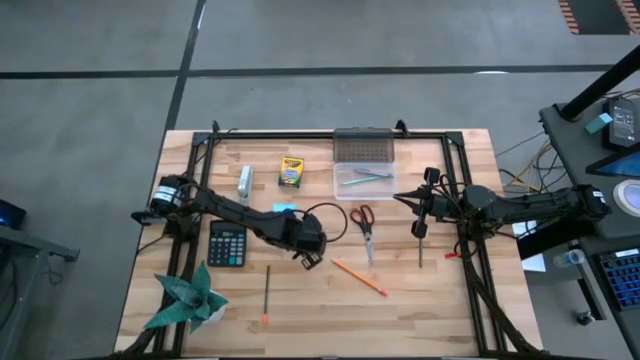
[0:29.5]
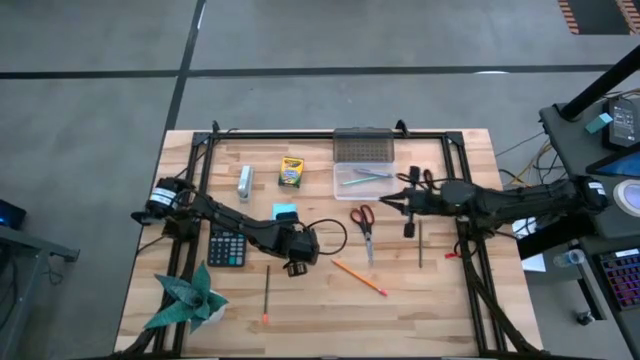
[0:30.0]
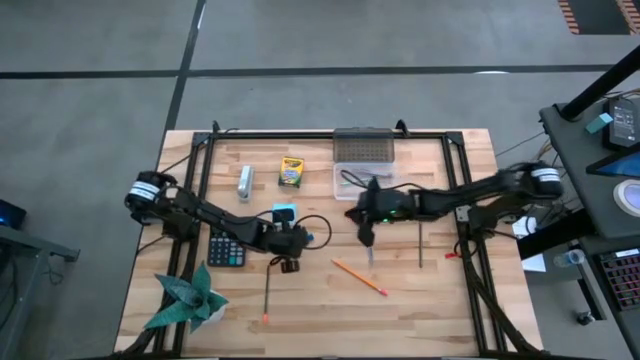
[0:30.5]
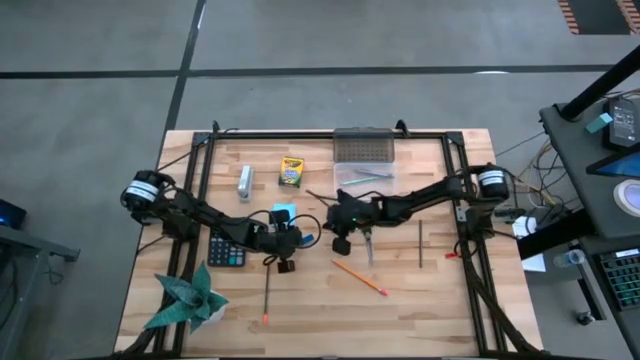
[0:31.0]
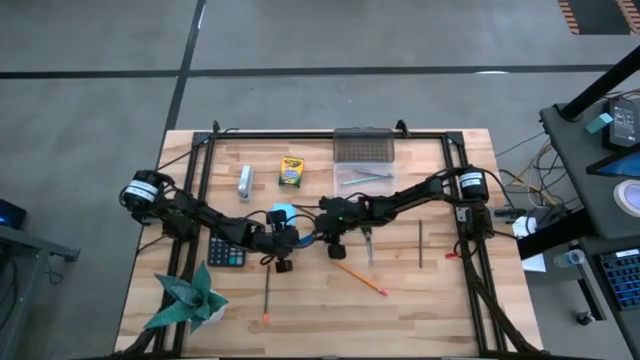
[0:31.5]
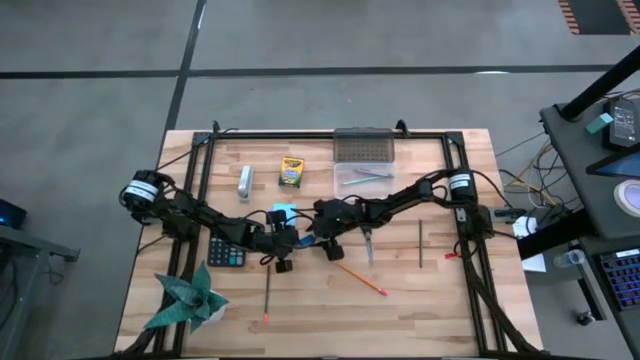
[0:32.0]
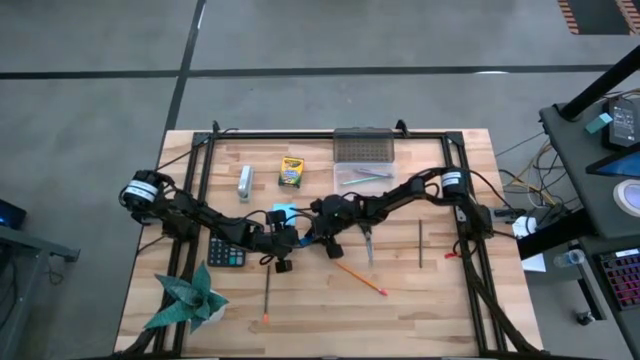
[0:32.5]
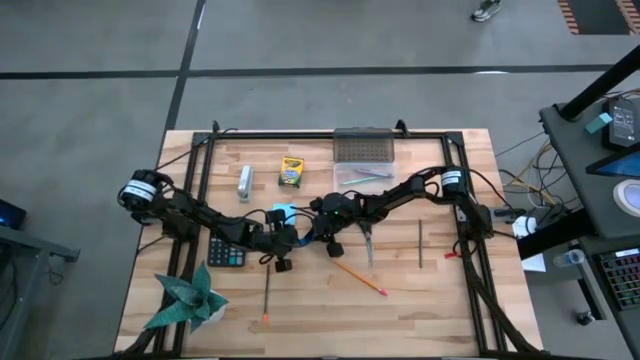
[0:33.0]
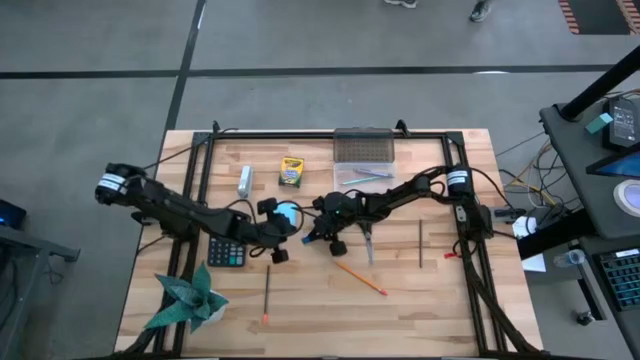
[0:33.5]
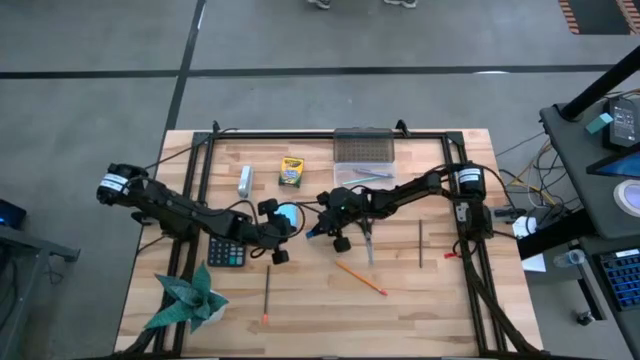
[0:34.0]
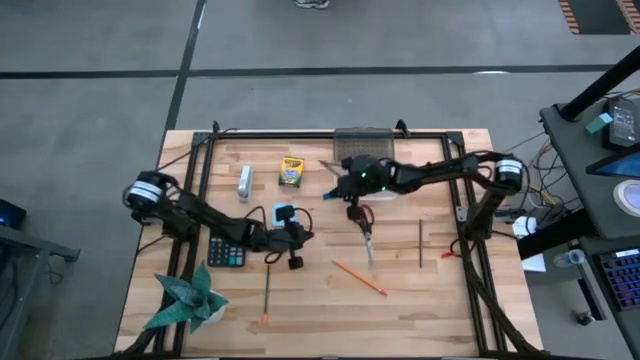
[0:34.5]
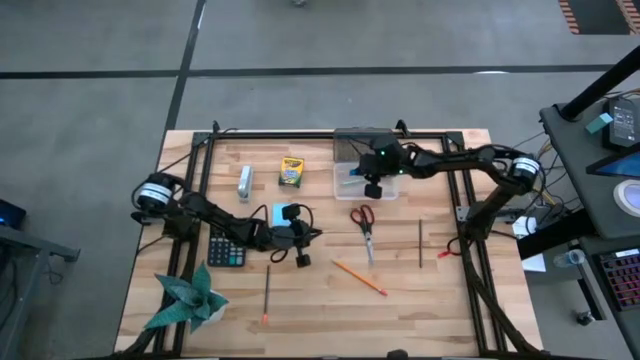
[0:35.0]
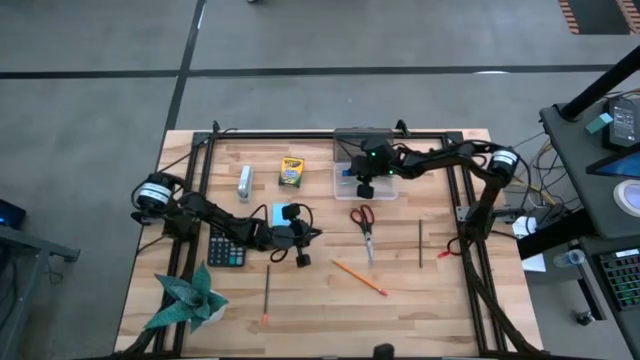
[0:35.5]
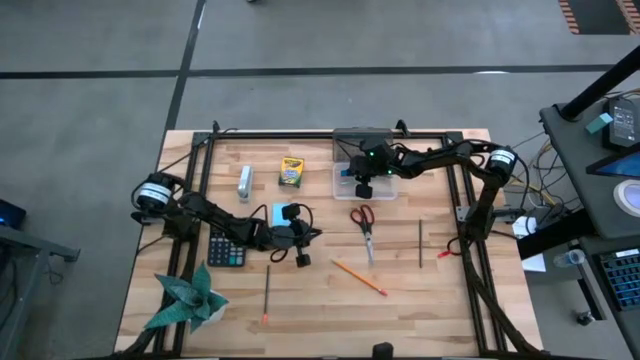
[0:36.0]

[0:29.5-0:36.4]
Task: Pack school essentials
Put the blue eraser into the transparent supply box

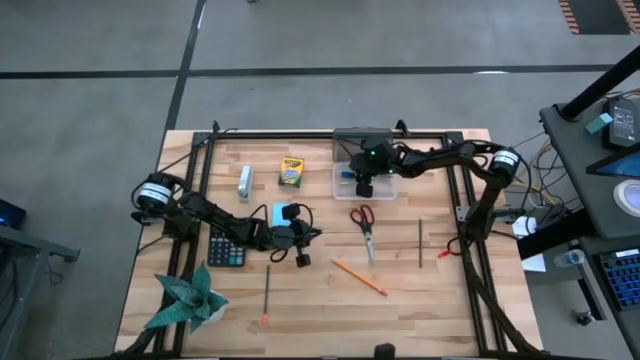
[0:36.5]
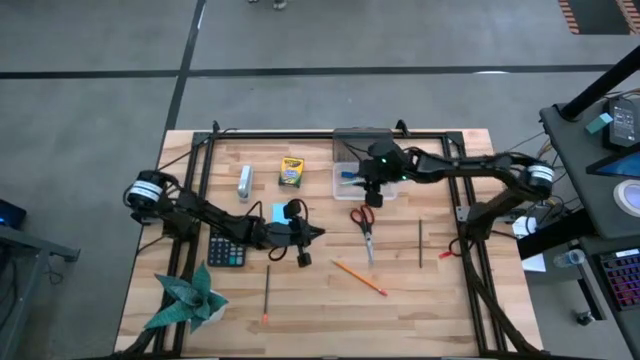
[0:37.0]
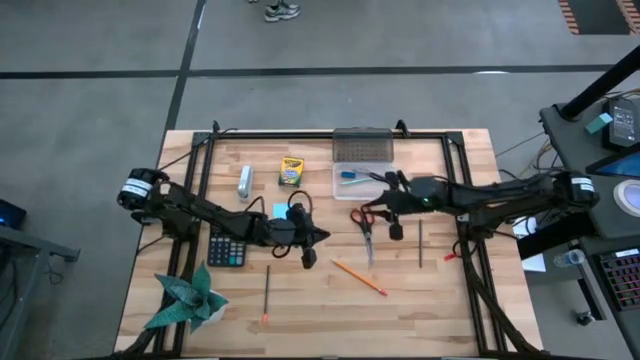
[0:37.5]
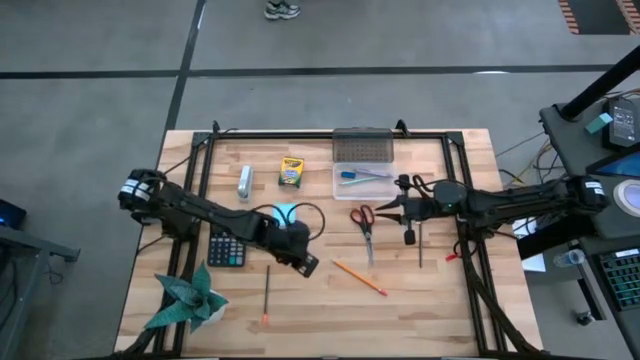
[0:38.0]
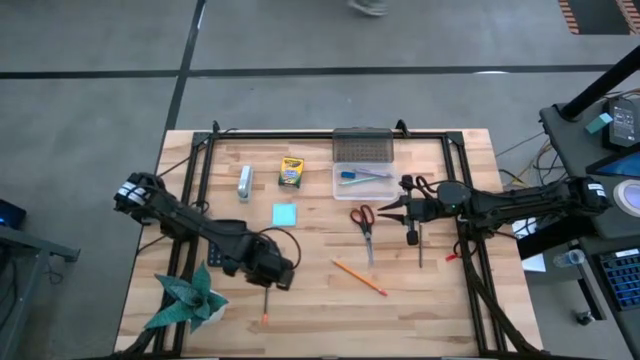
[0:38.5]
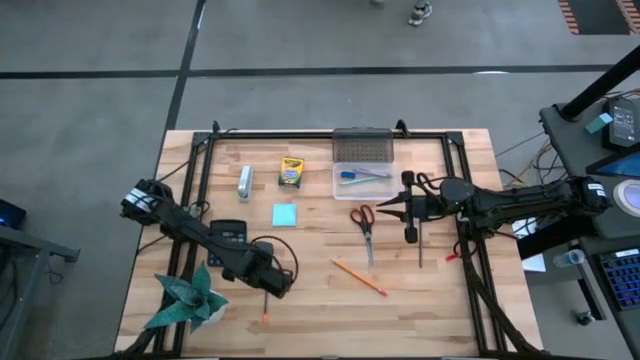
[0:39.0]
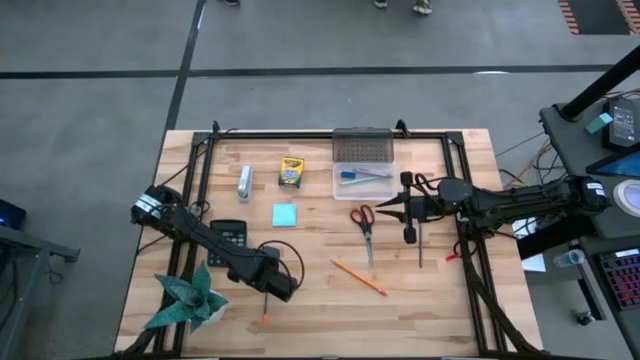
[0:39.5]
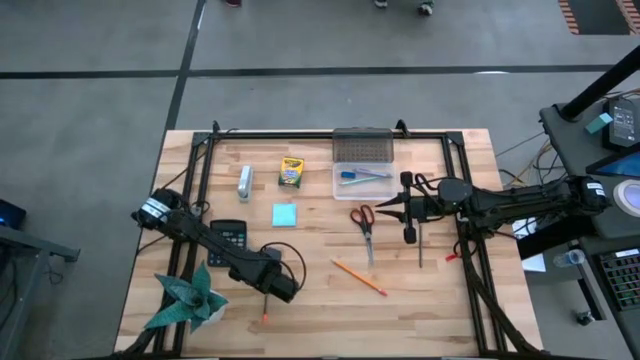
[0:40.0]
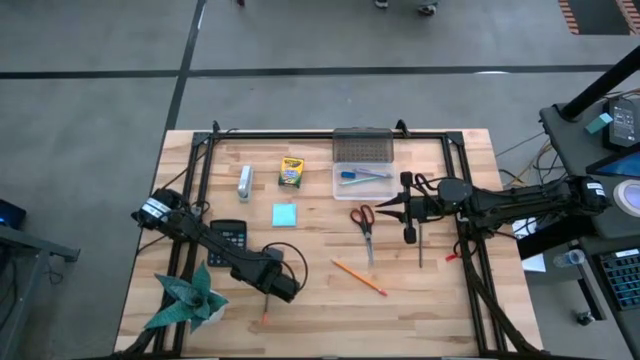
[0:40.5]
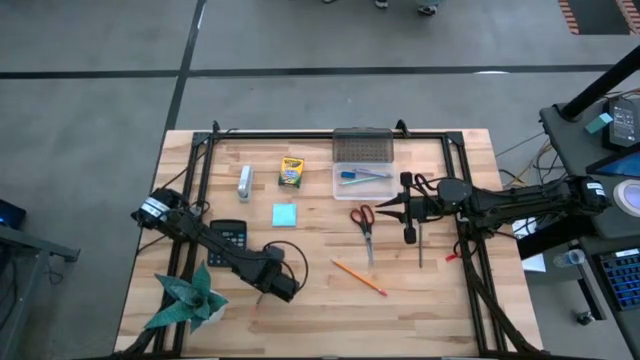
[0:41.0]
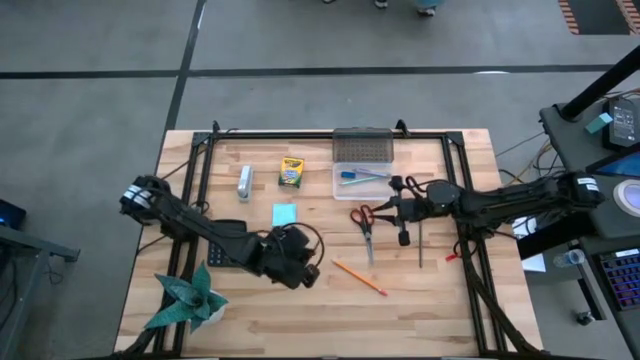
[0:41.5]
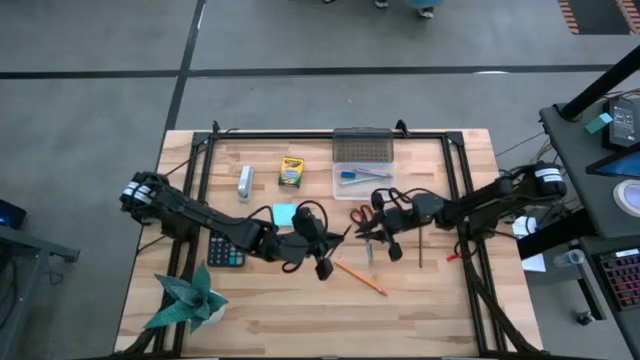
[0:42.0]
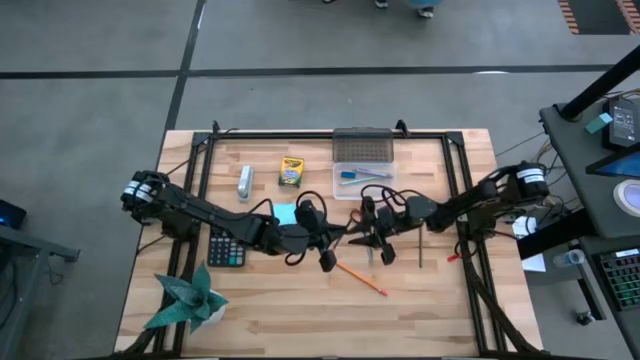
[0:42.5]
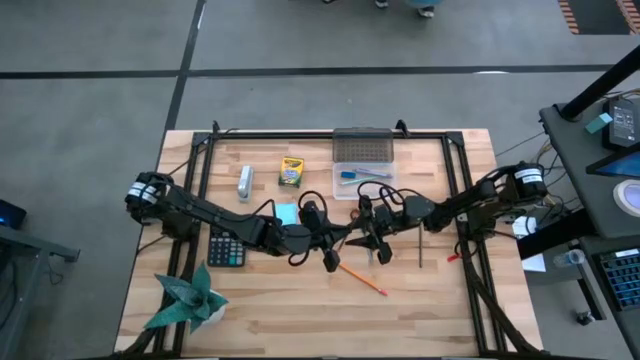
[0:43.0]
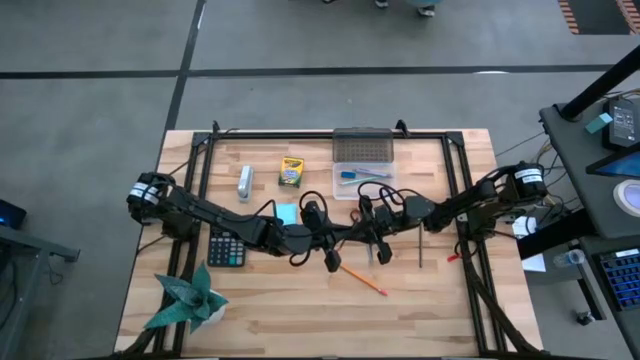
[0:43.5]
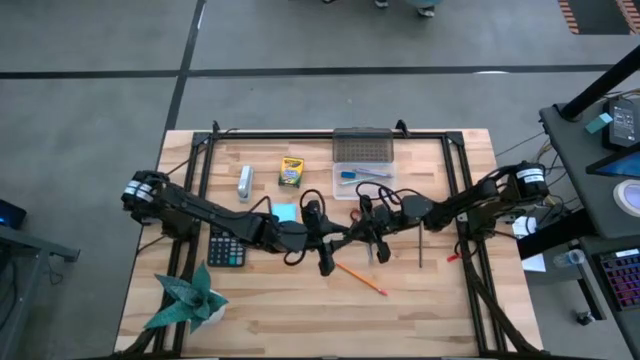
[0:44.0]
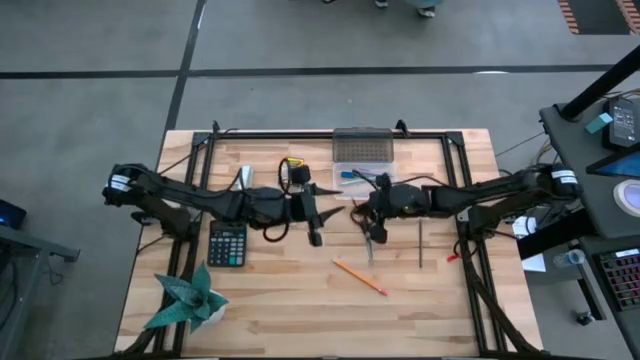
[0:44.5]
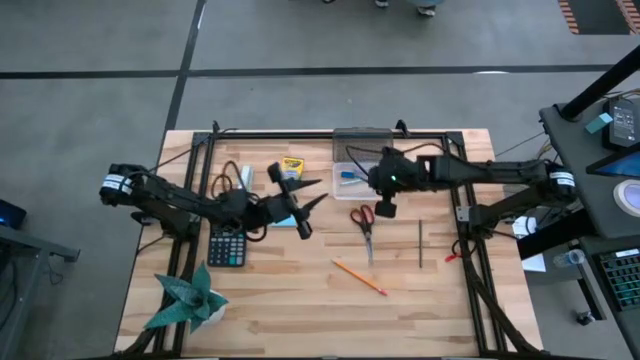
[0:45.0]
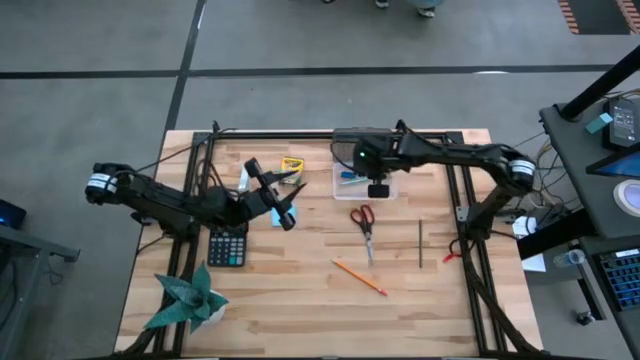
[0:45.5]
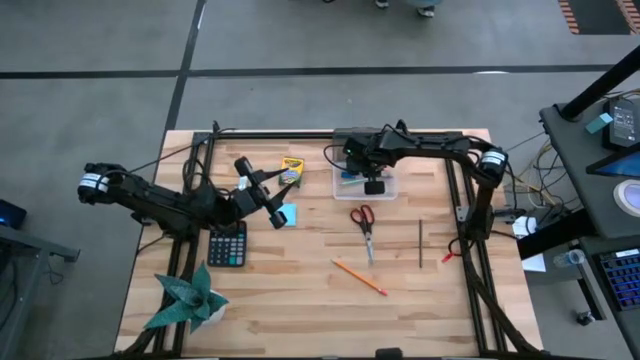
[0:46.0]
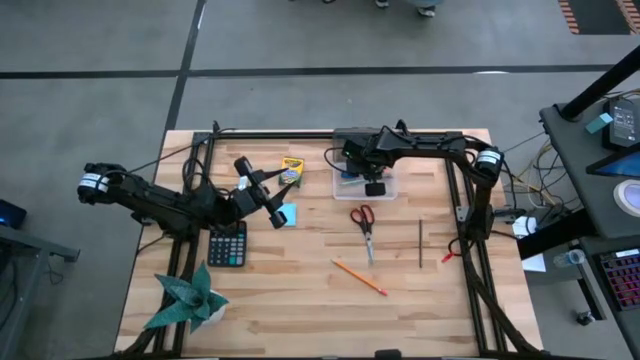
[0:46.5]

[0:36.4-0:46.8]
Put the left black pencil into the transparent supply box

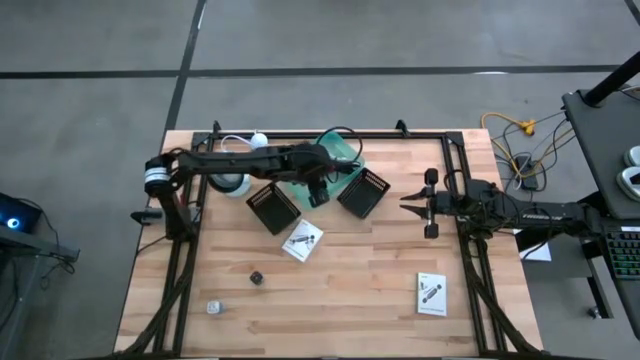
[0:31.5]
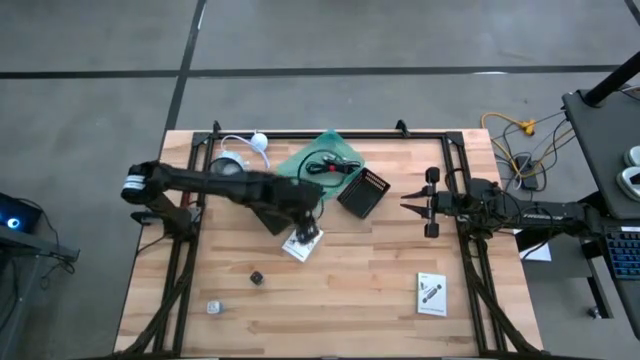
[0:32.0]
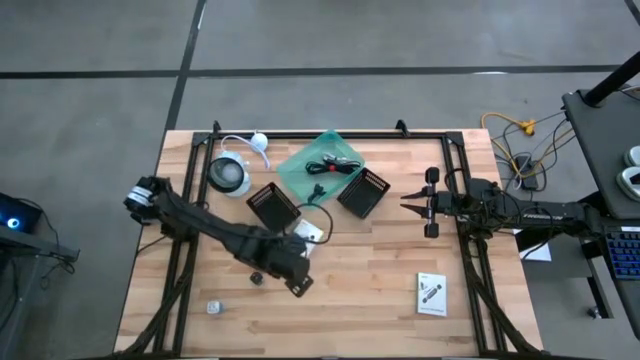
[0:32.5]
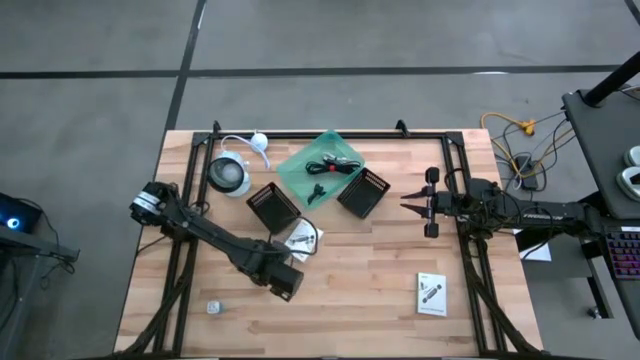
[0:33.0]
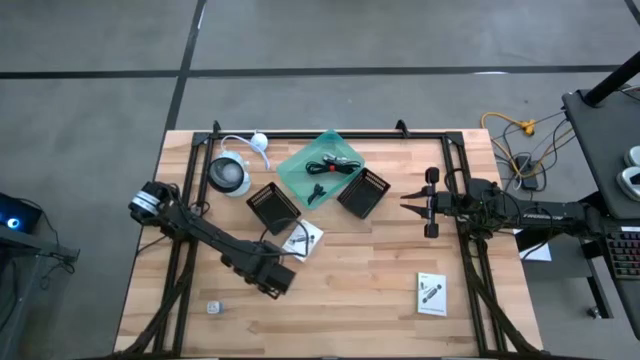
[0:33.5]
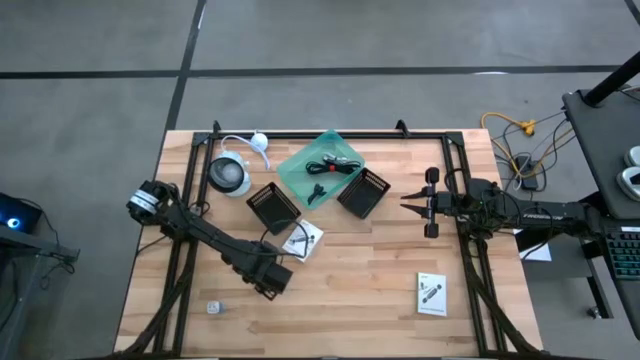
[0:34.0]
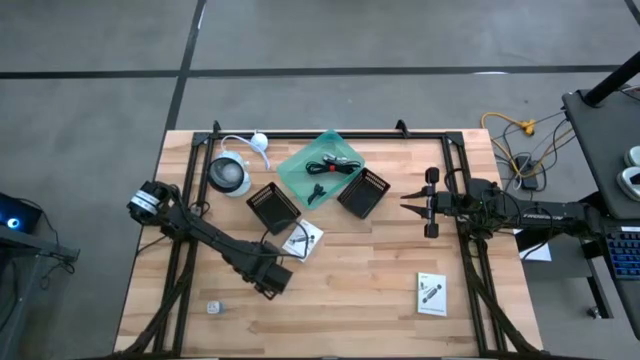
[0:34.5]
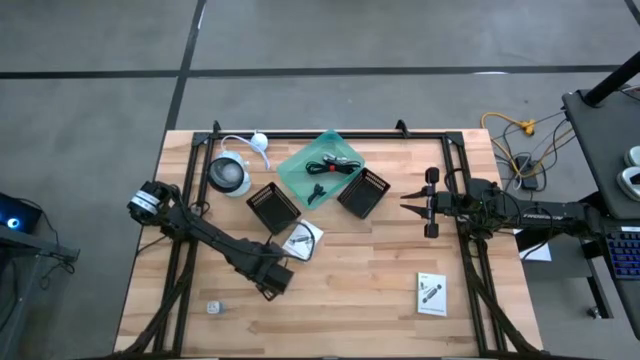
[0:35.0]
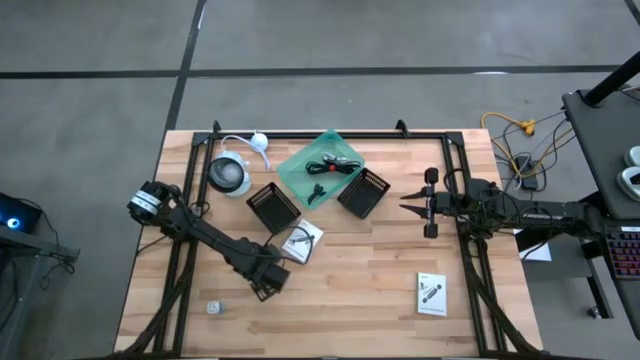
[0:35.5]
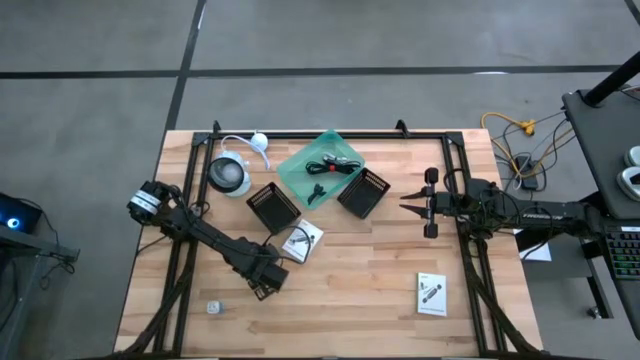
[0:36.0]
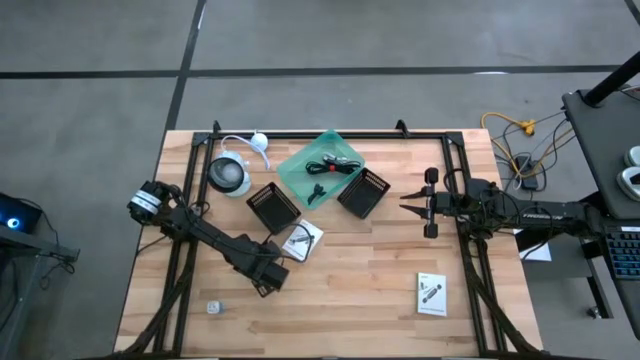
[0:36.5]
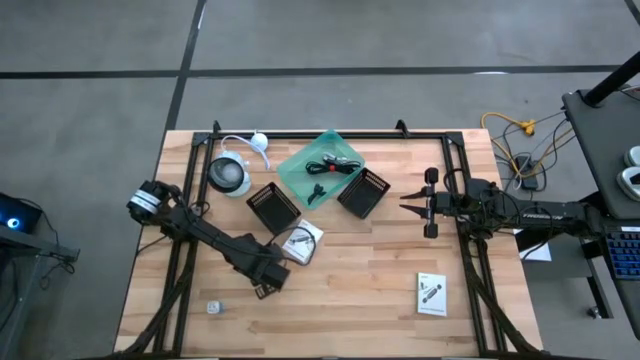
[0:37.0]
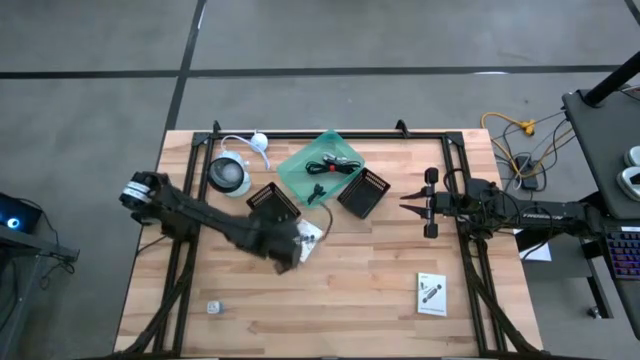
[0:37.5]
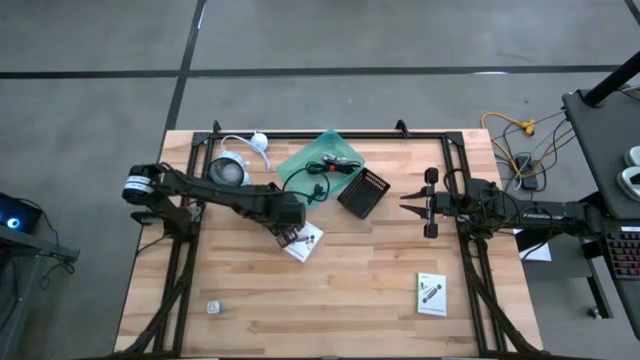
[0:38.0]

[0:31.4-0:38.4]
Task: Pick and place items into bin
Put the black charger adapter into the left black bin
